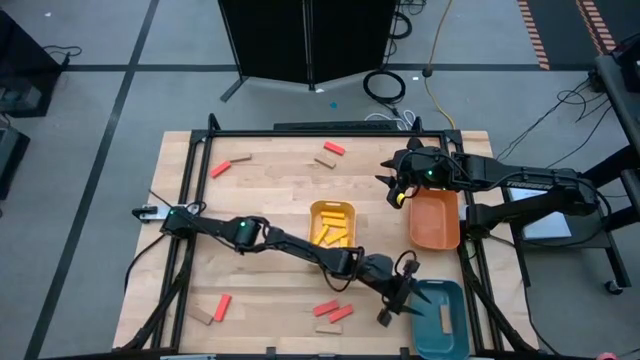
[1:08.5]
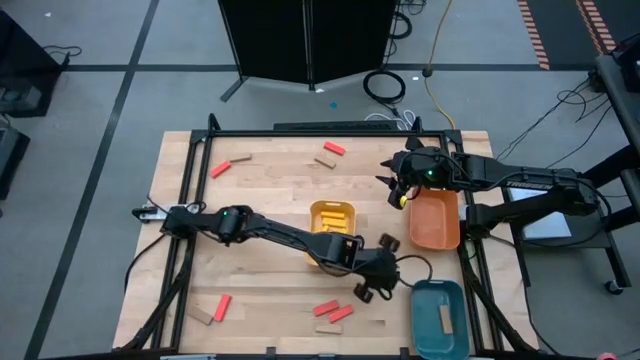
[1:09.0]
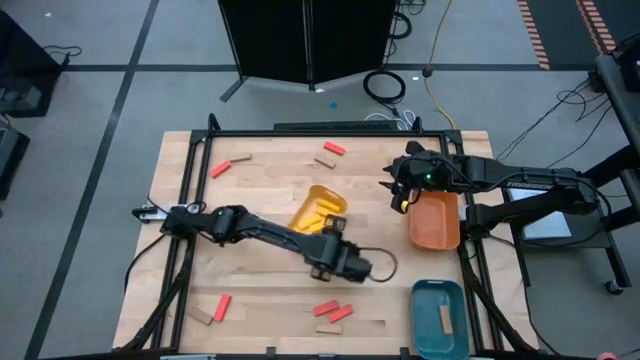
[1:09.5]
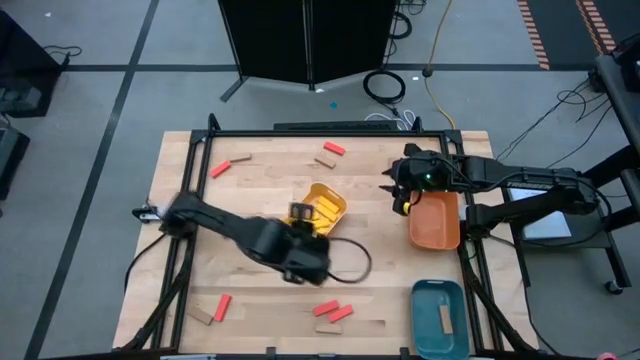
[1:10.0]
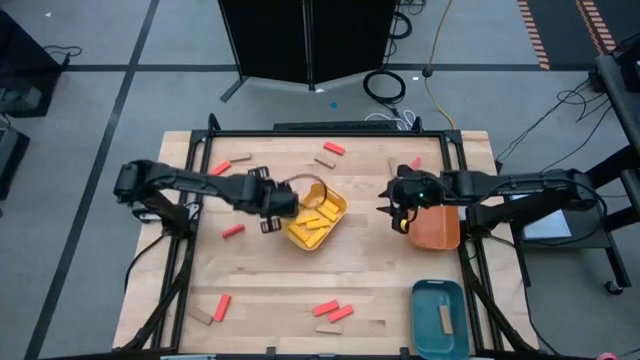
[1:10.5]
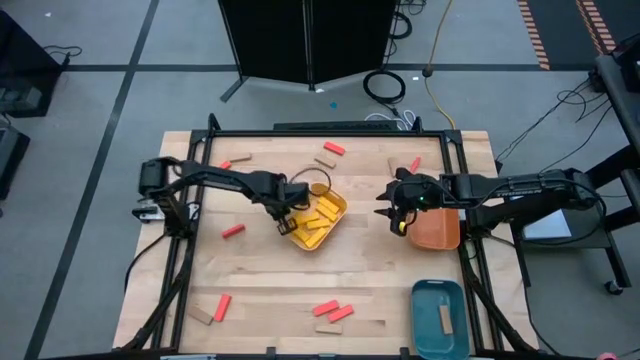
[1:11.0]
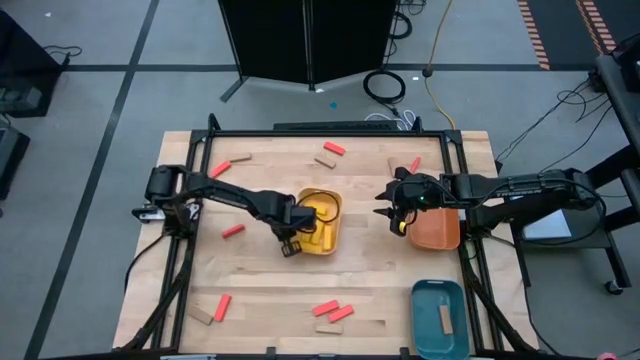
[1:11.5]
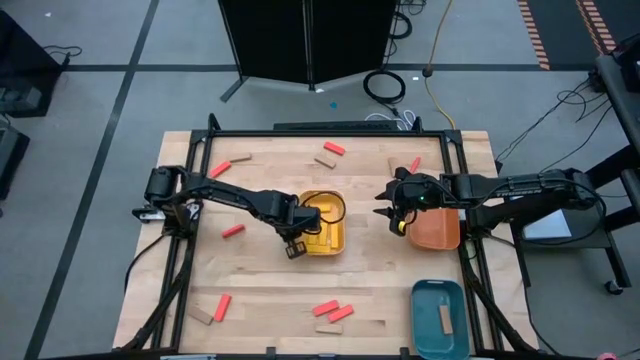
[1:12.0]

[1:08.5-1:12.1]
Task: Sort blocks
Adjust the yellow bin

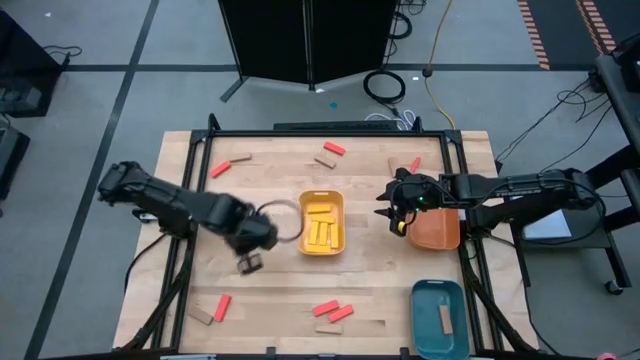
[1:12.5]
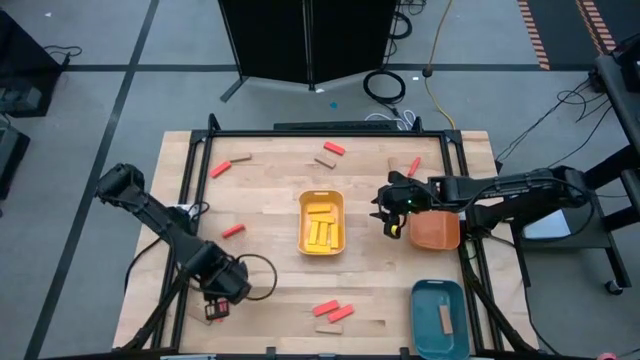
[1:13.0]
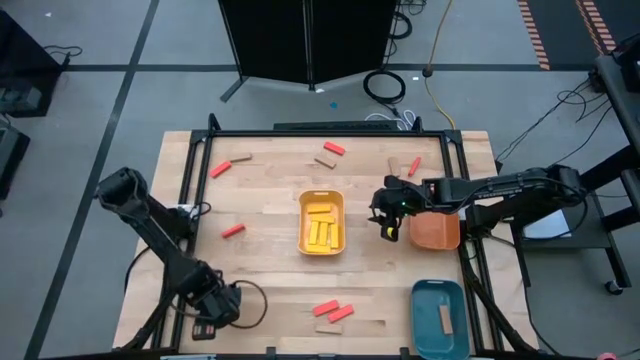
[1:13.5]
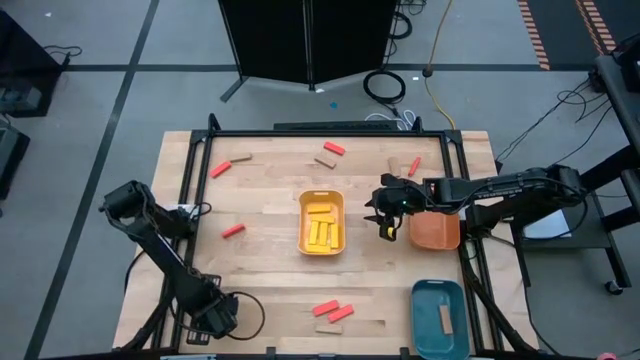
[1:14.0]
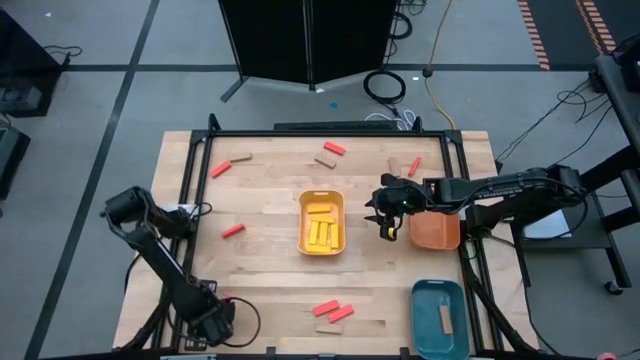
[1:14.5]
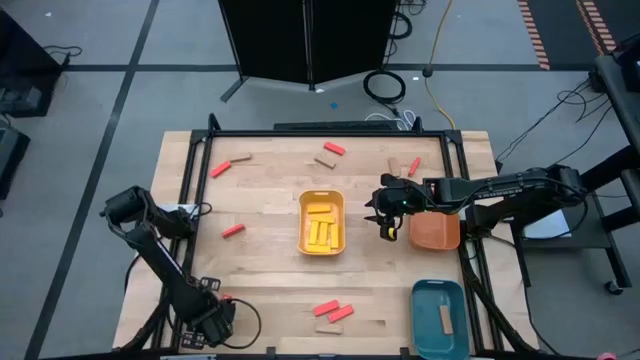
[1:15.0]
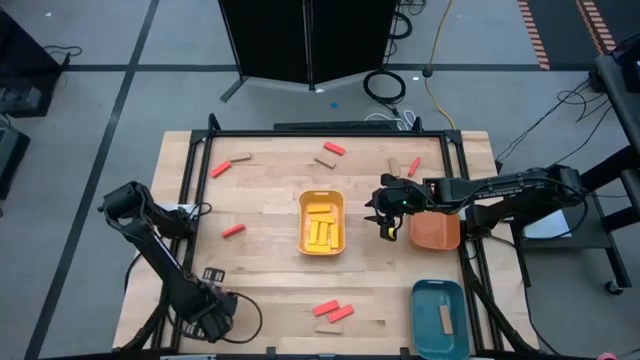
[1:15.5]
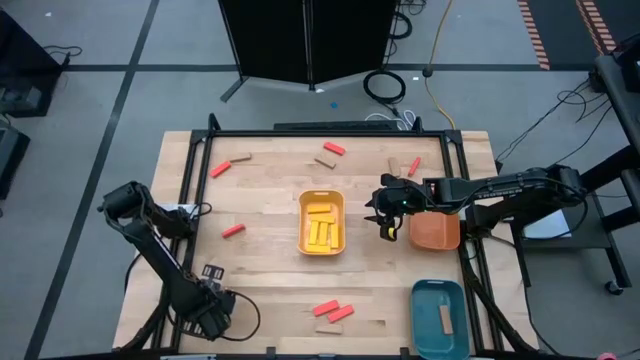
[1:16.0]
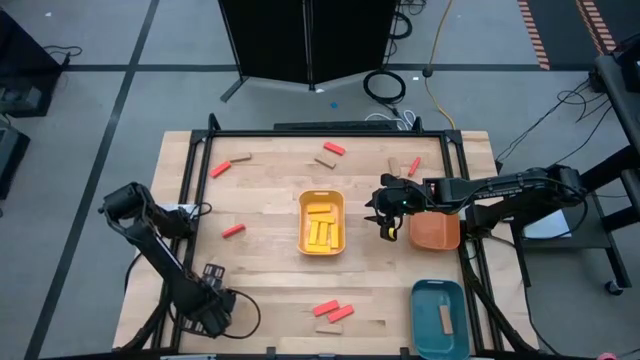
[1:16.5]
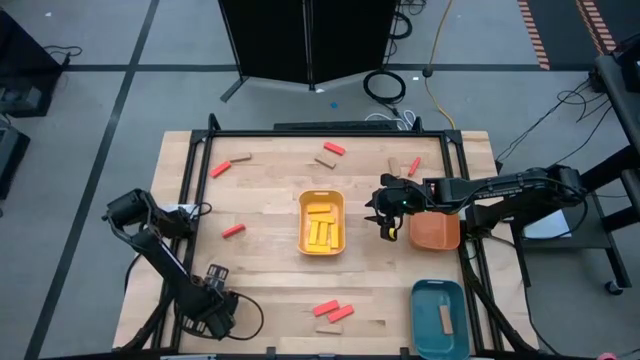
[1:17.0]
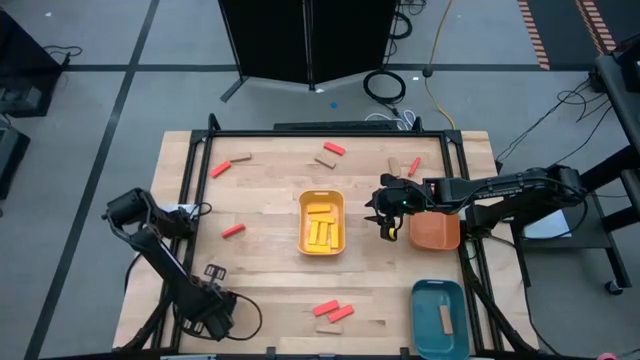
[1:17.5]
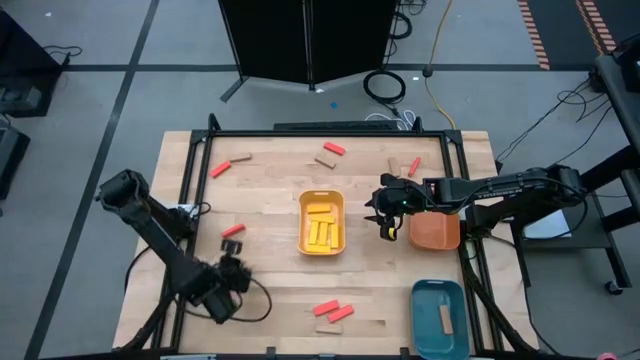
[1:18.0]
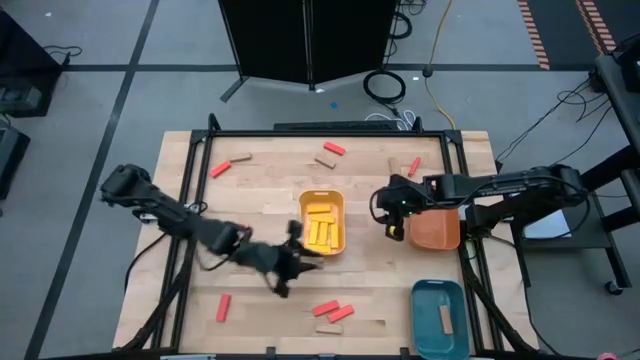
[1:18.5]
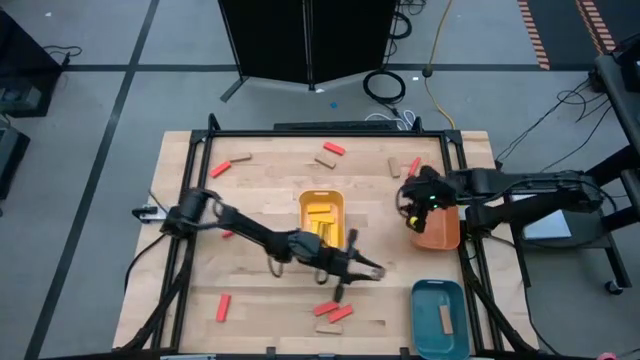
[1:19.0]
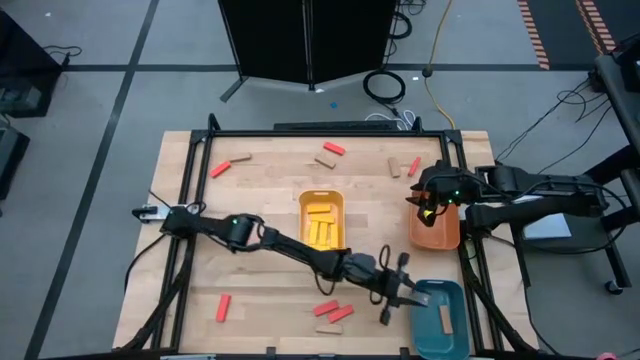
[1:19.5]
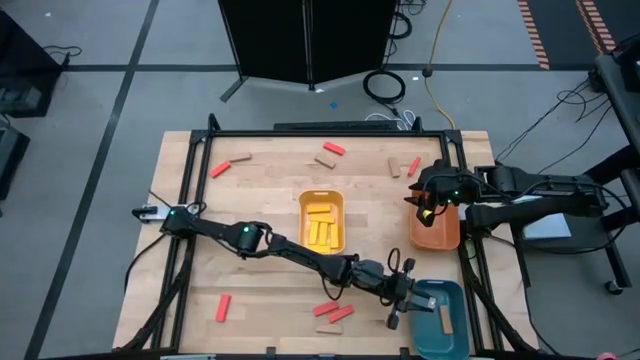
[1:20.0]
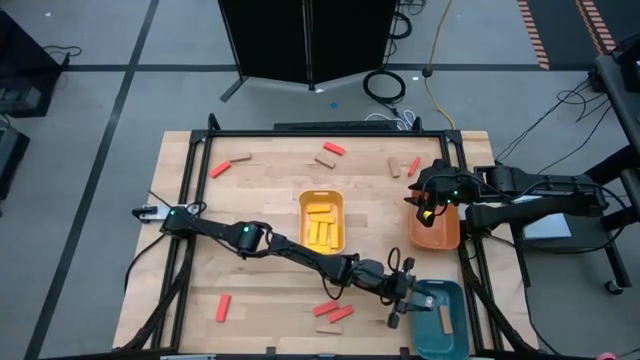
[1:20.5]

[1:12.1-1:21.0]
Put the brown wooden block into the blue bin

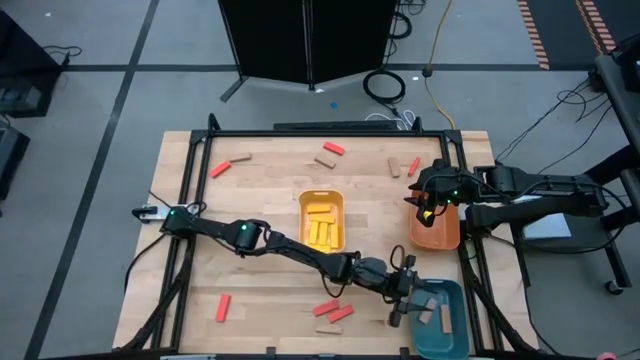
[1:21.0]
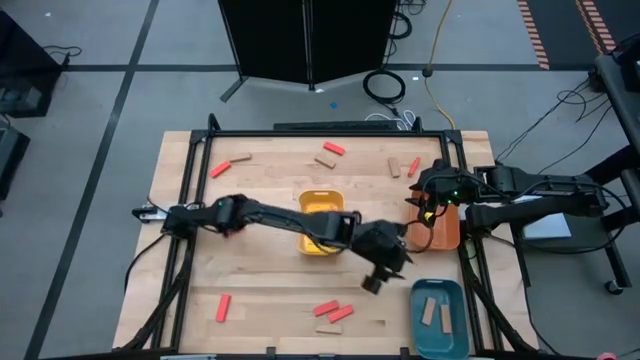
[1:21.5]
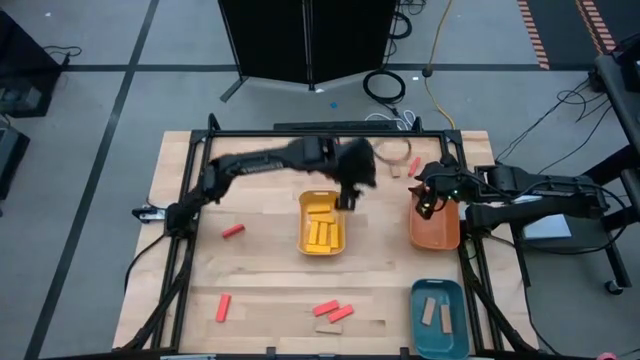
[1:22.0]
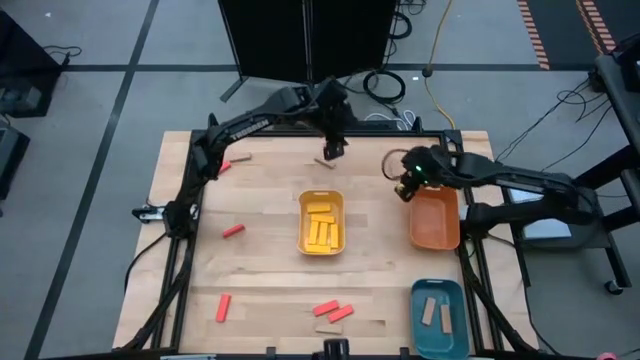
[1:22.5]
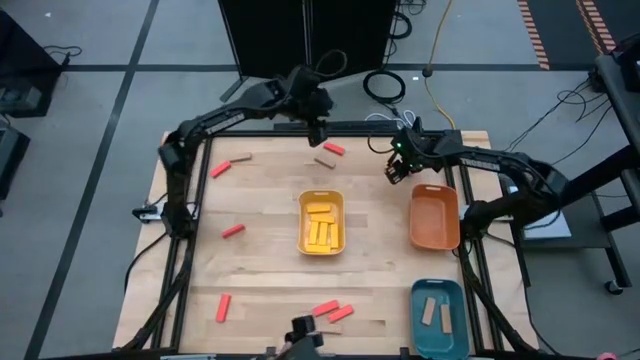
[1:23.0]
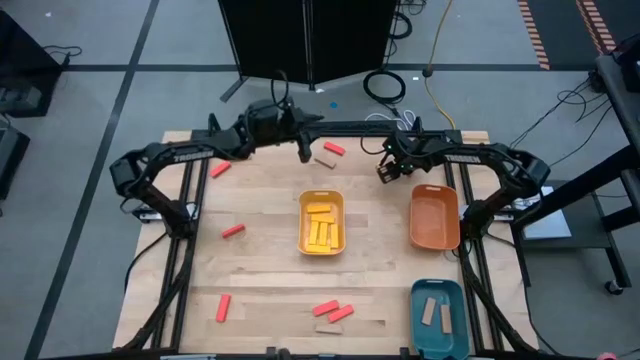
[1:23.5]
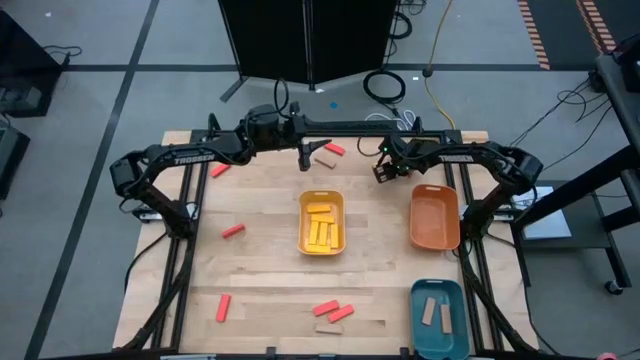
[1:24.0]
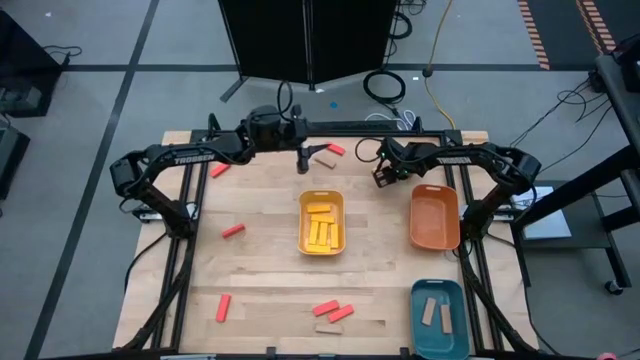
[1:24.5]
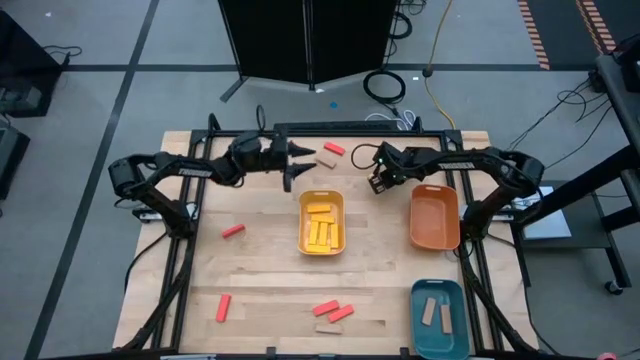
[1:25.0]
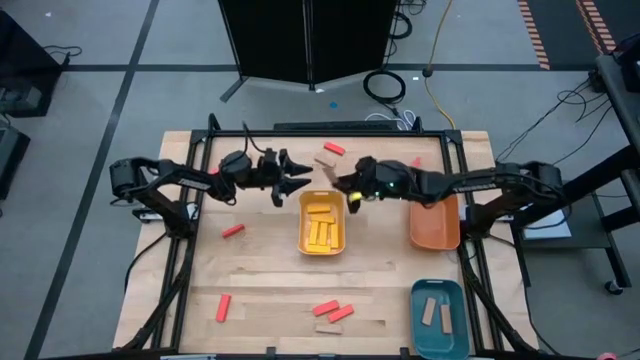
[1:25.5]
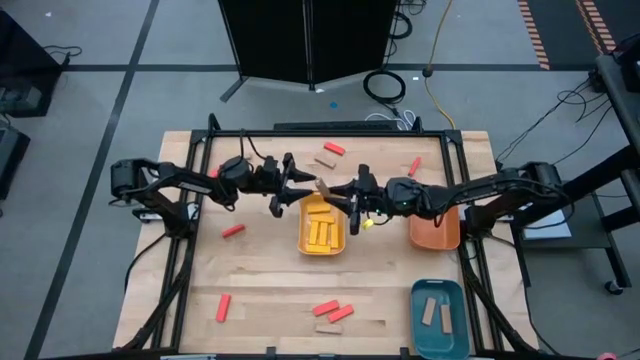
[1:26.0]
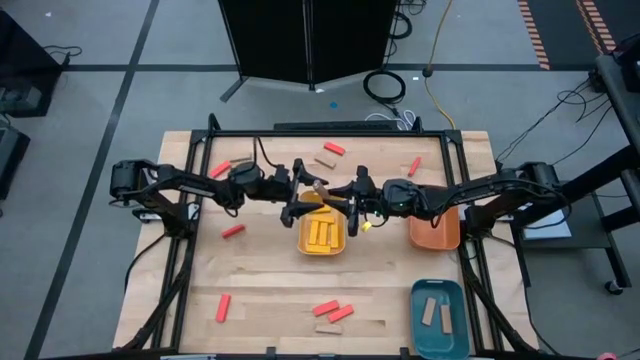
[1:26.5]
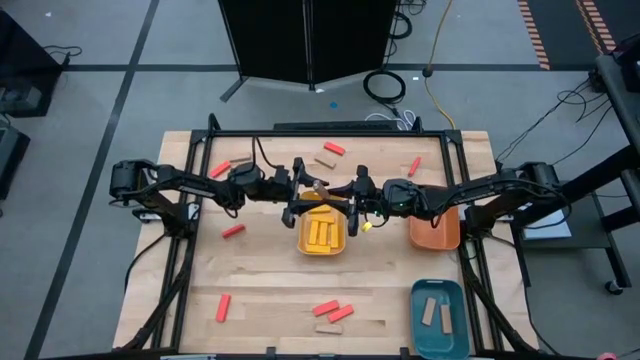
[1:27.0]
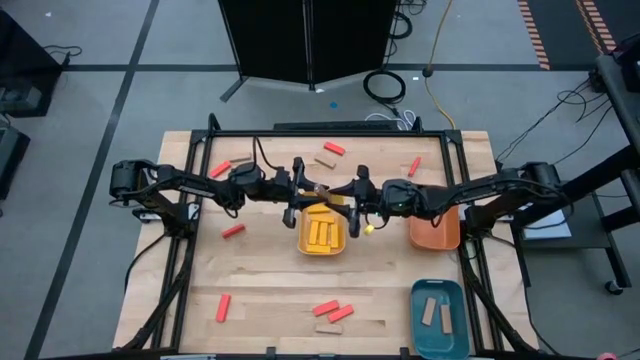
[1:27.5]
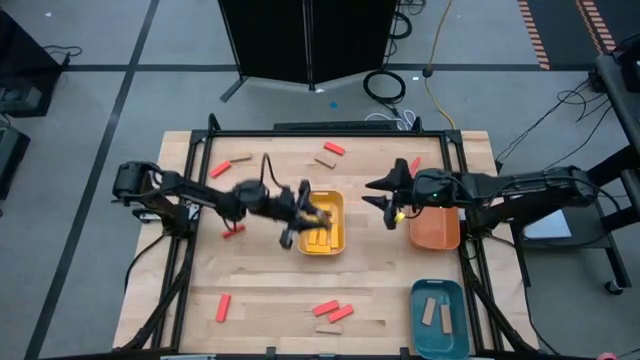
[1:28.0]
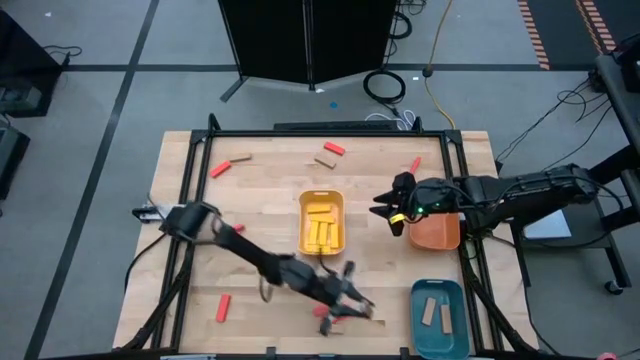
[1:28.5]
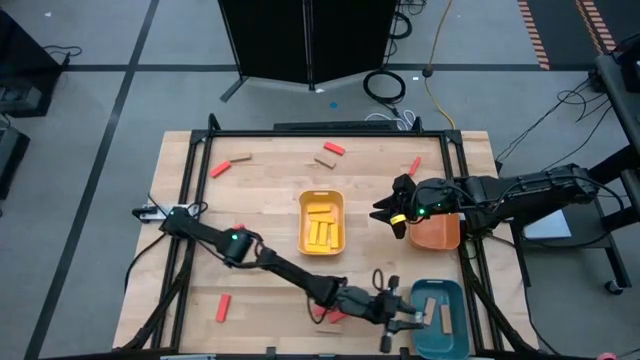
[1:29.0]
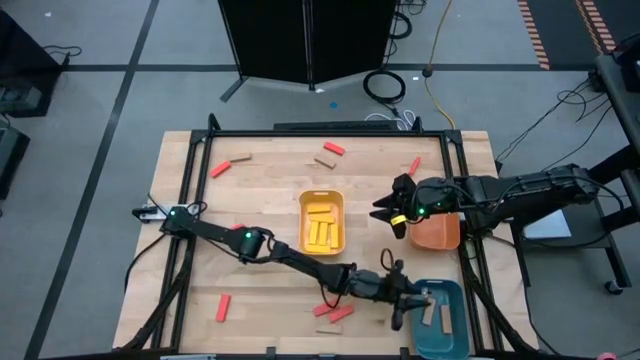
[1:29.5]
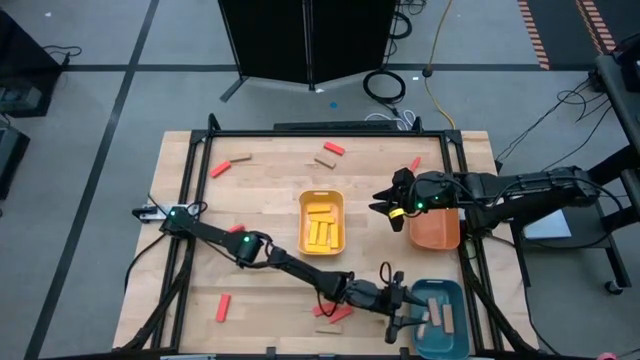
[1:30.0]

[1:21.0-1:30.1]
Put the brown wooden block into the blue bin

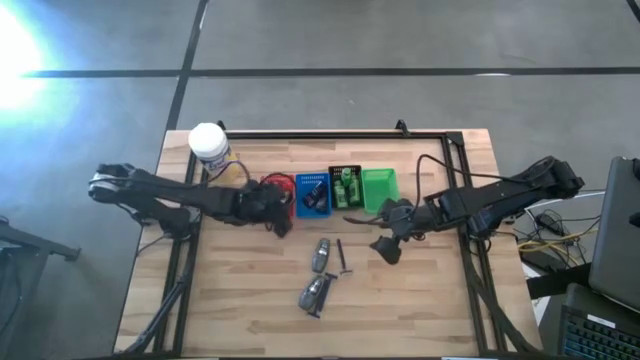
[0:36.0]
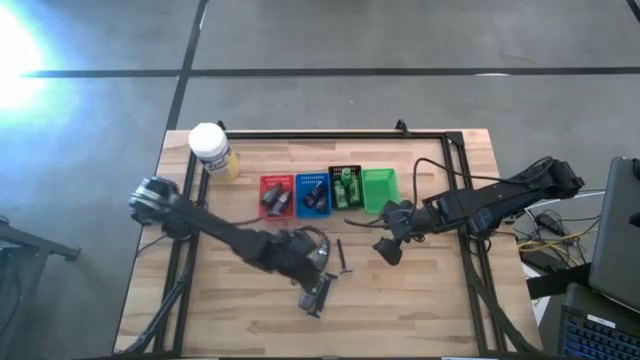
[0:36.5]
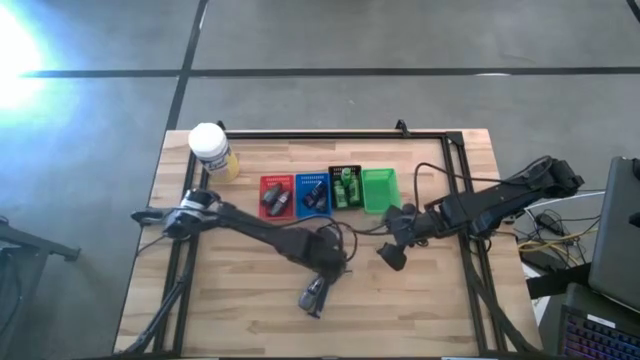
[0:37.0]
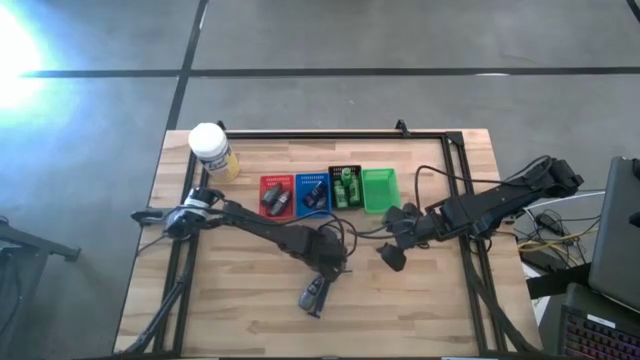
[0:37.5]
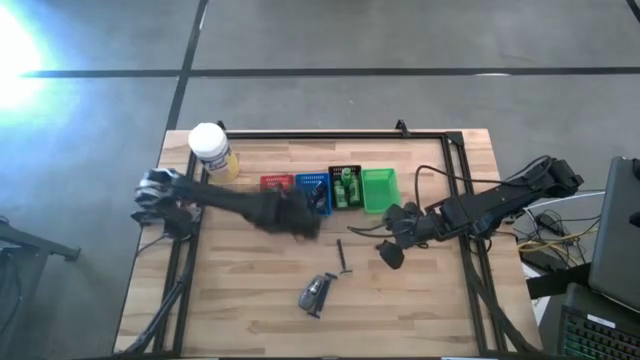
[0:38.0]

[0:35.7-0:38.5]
Task: Pick & Place Travel size toiletries
Put the gray deodorant into the red bin
